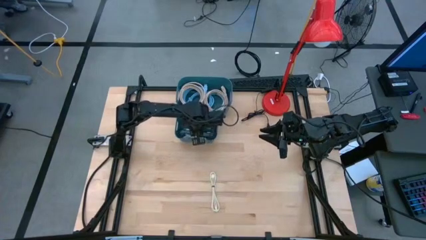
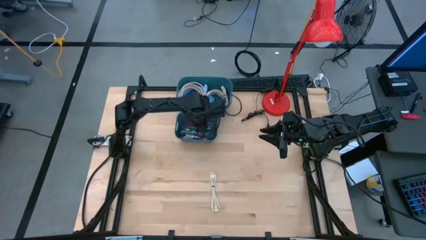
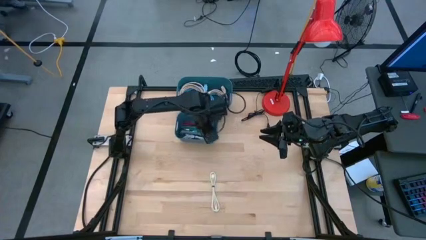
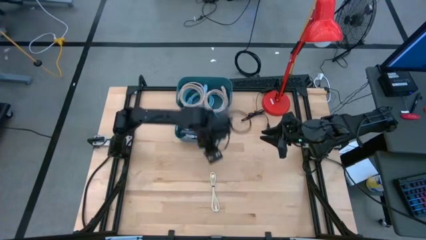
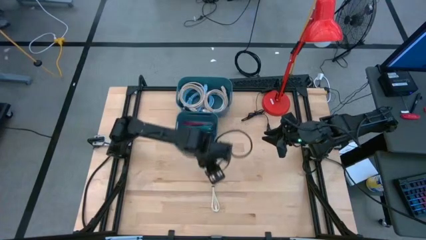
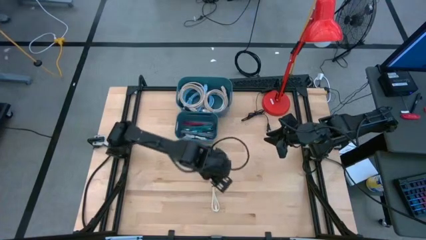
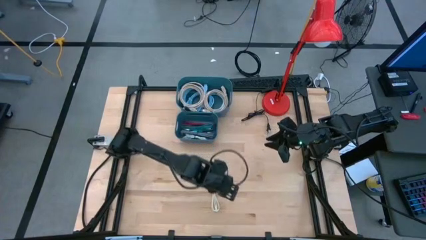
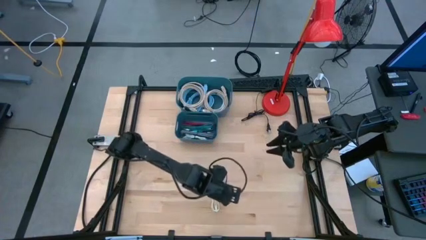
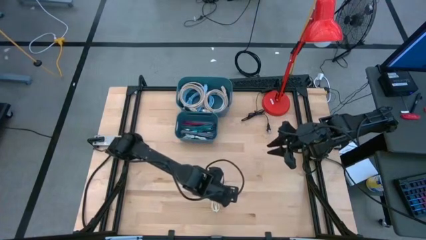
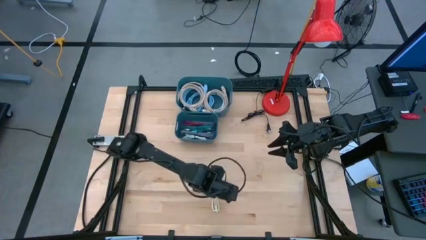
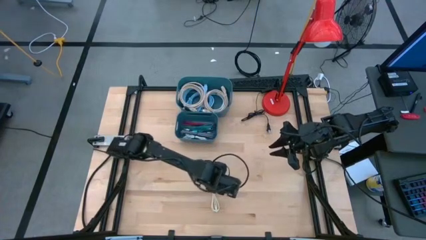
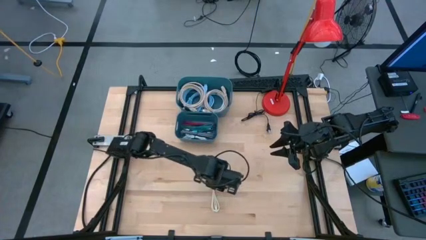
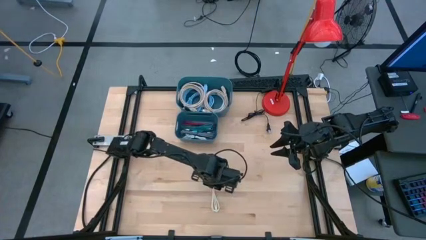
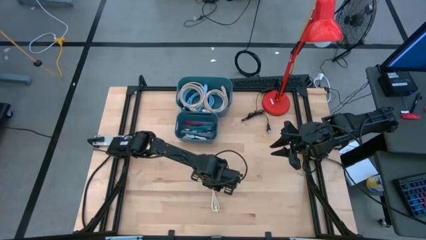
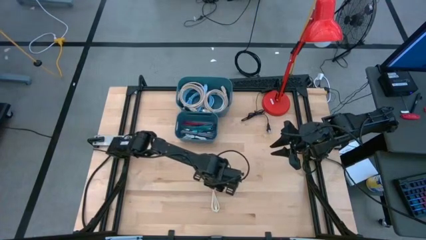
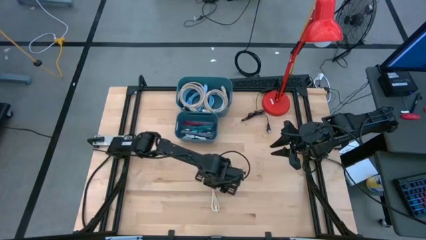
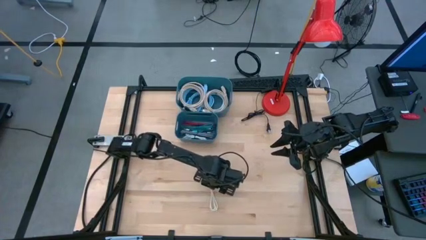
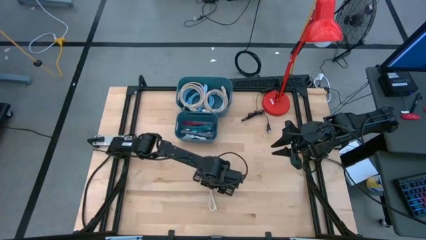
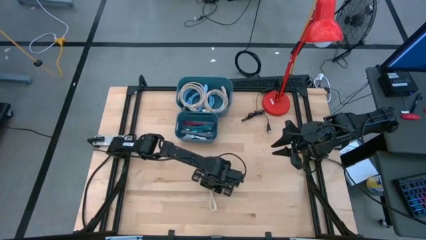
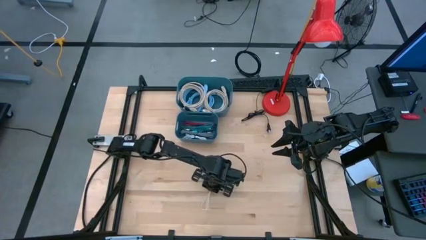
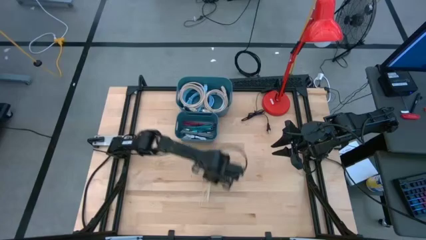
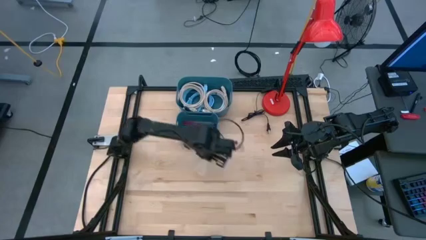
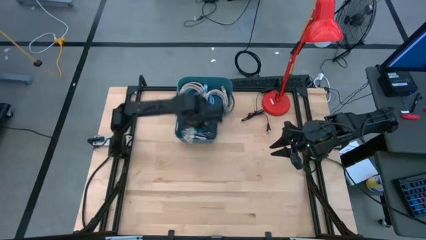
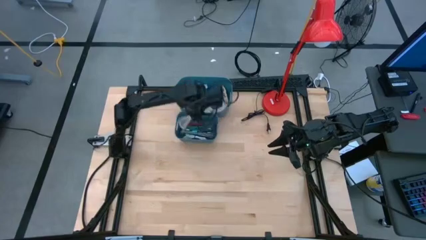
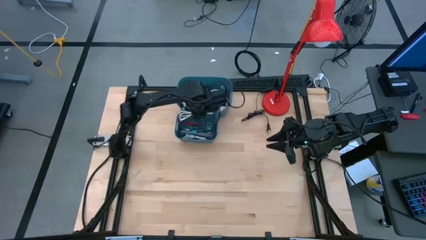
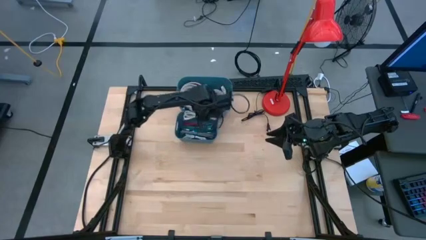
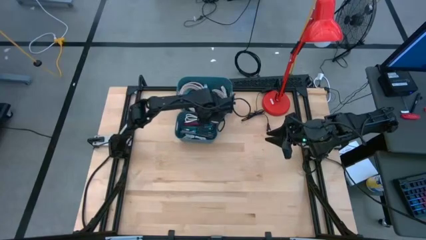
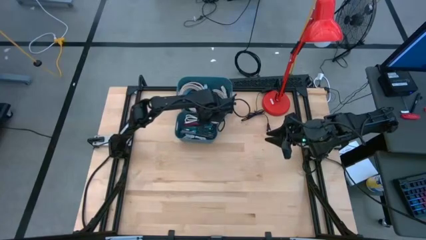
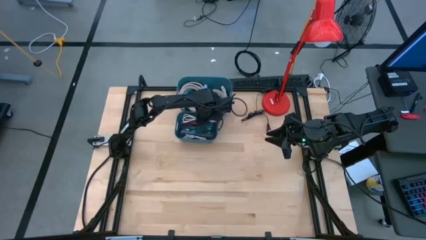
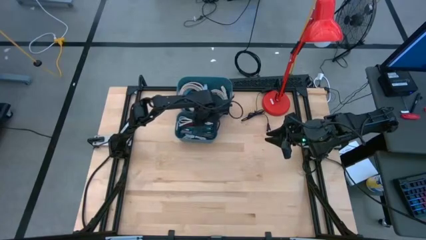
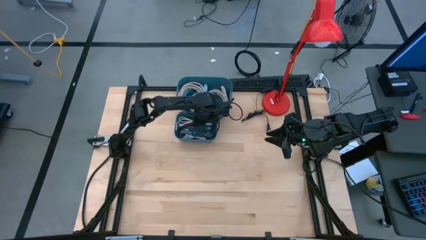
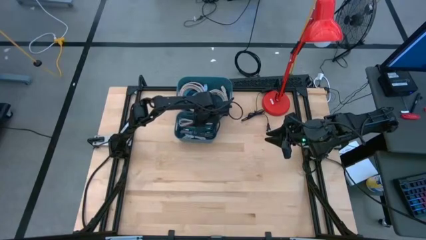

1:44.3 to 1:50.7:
Task: Pick & Place USB Port
Put the brown charger cable into the bottom blue bin

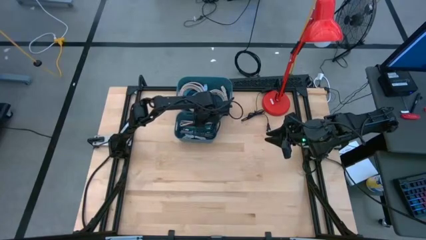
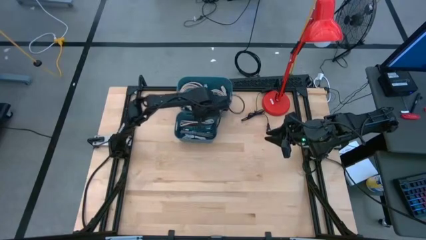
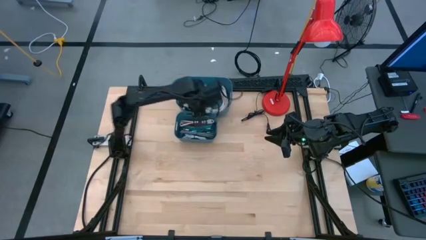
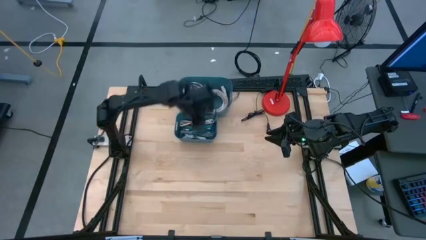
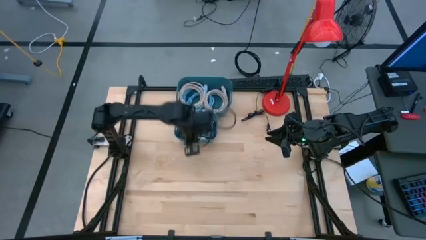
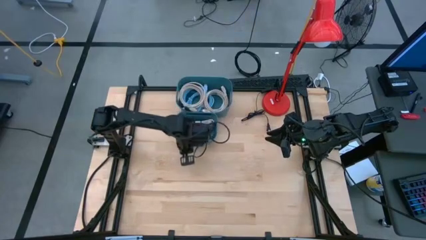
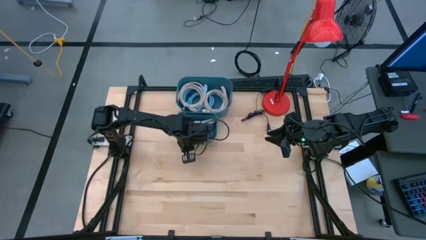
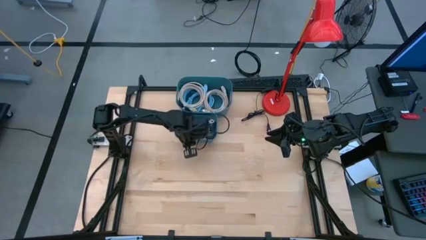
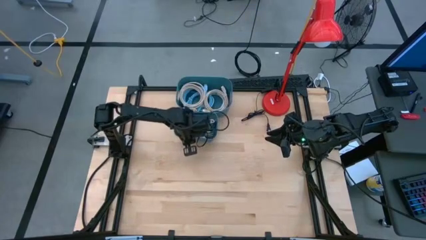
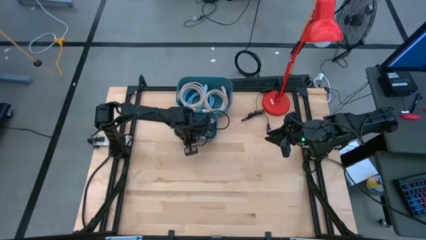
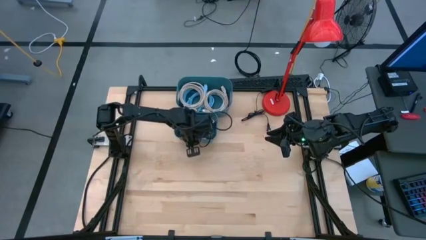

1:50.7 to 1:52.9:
Adjust the blue bins

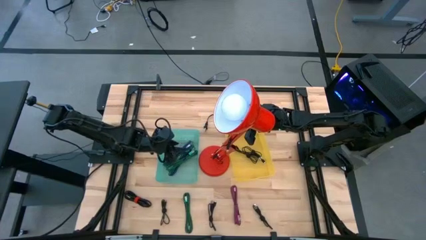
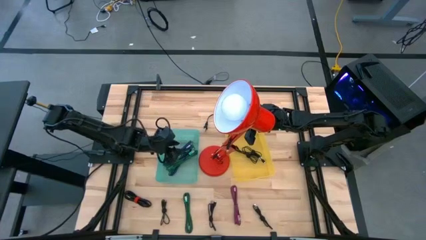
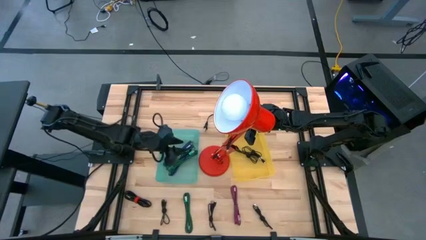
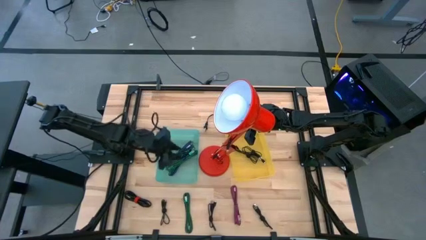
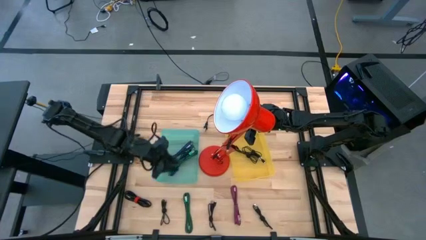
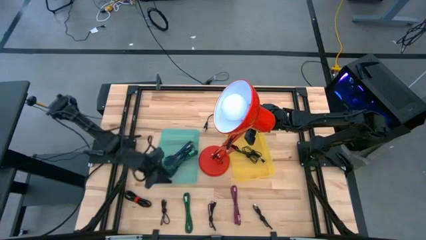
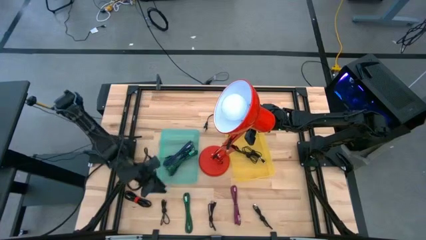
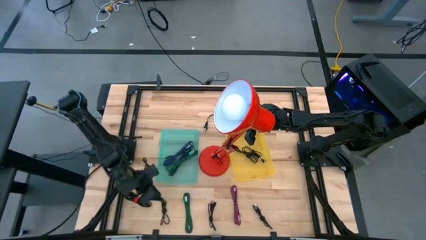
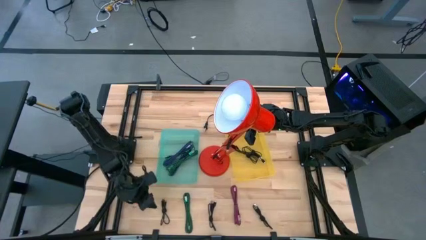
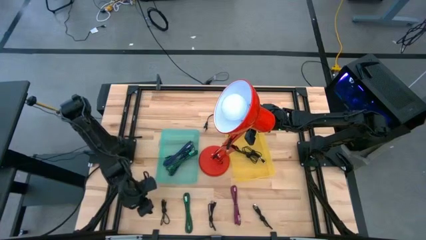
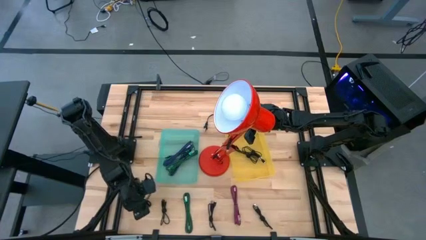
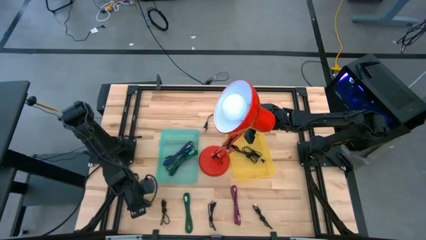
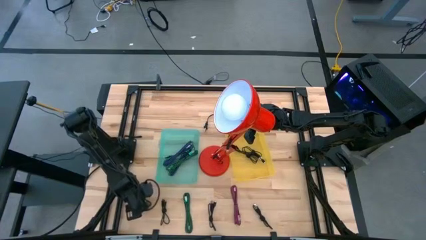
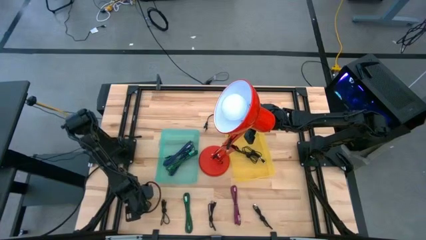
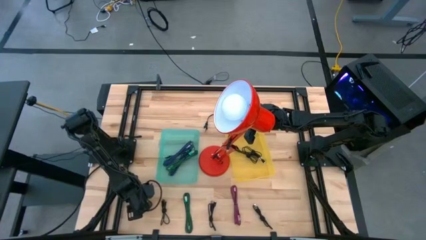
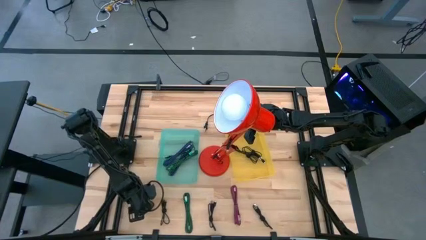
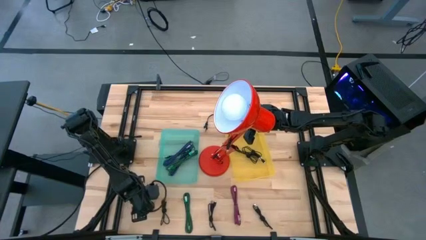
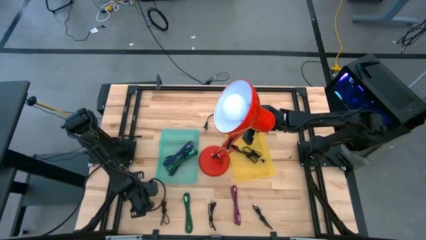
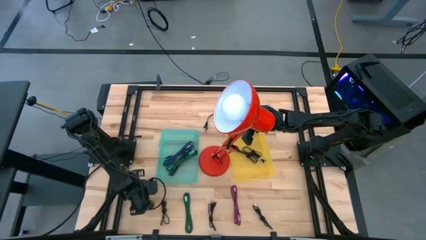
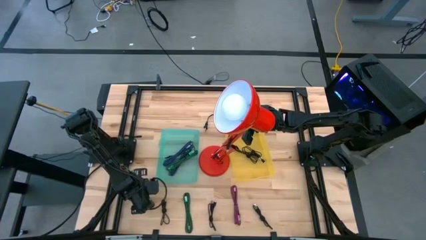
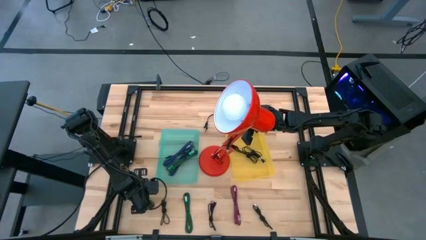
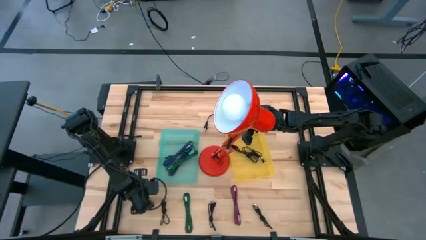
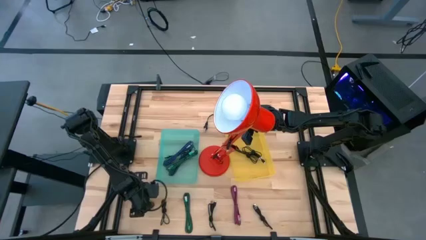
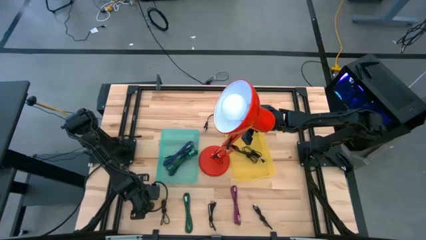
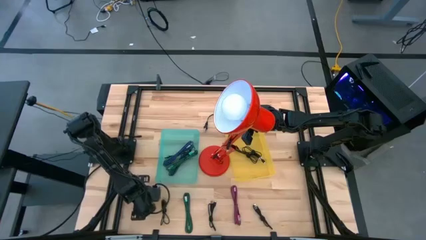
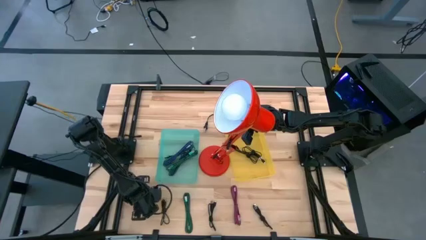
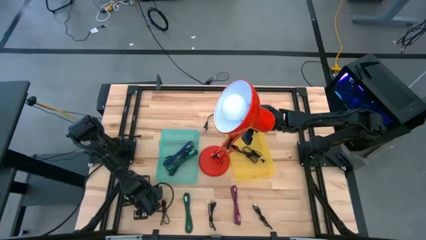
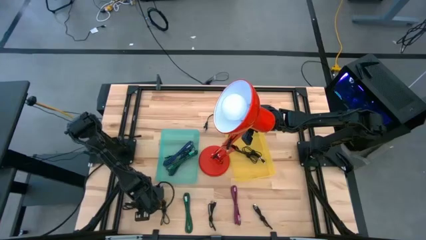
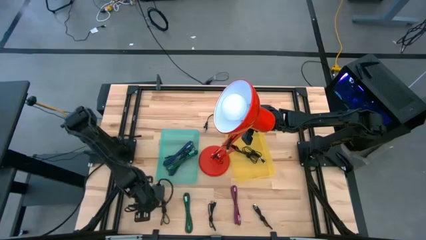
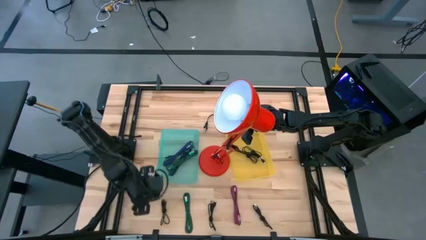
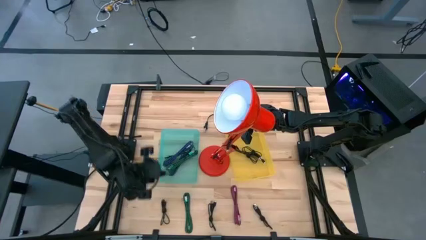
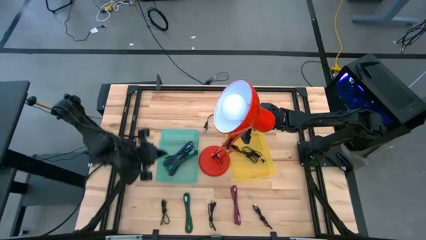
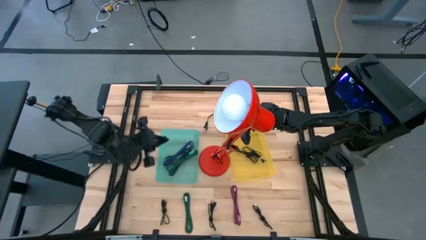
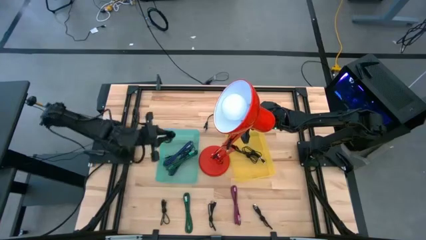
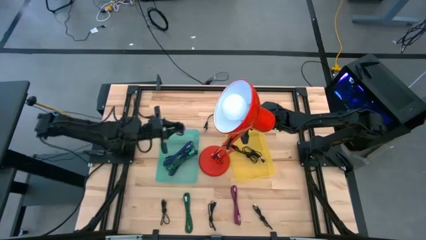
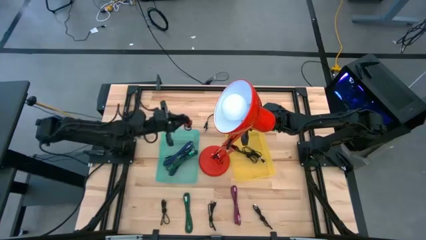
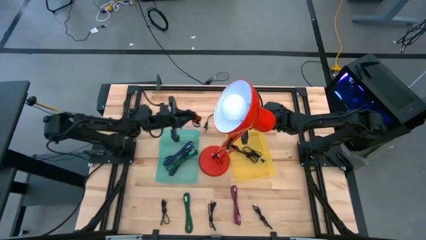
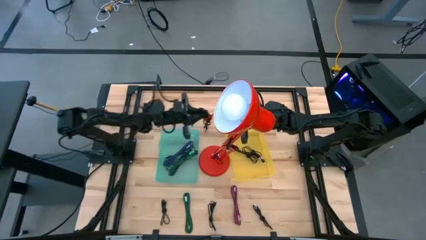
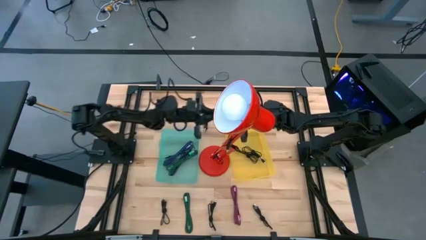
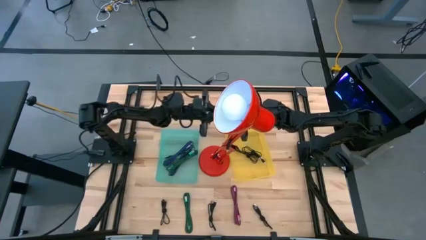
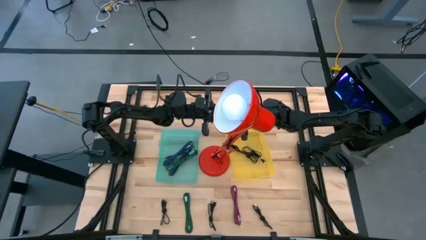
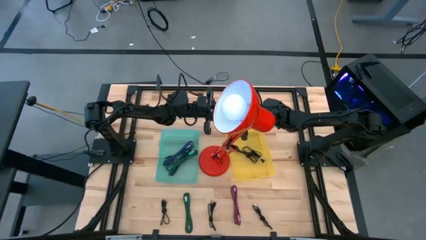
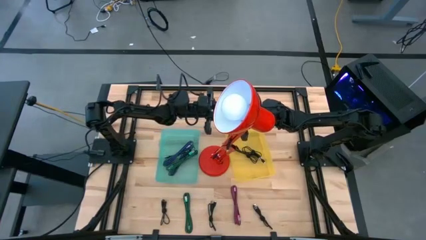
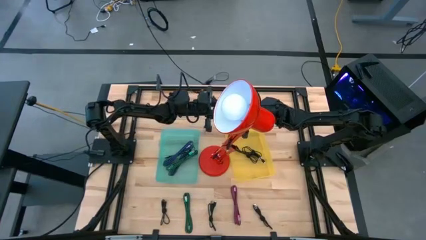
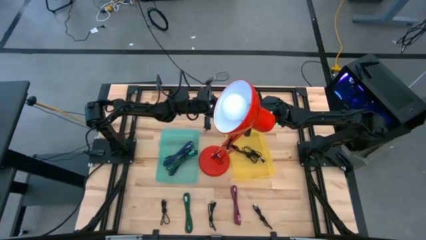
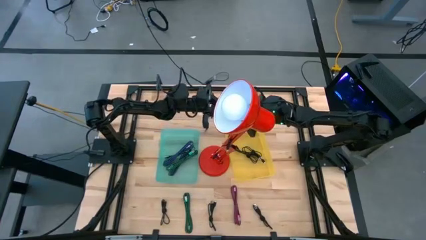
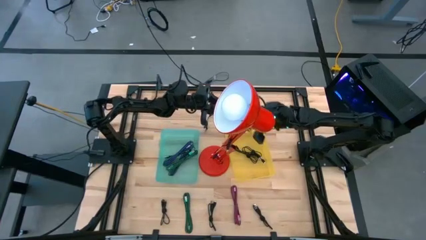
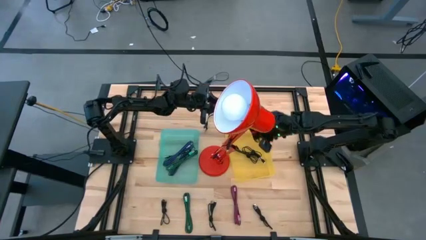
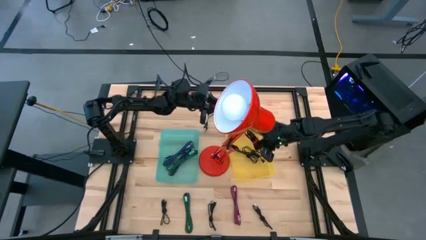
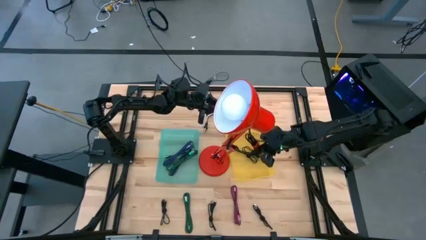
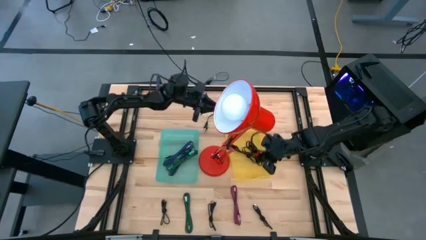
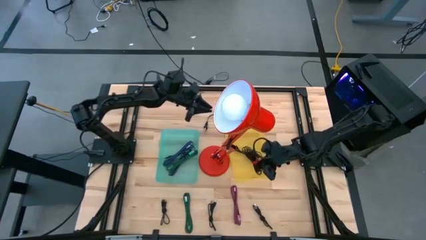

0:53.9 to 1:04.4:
Task: Pick & Place USB Port
Put the black charger cable into the yellow bin
